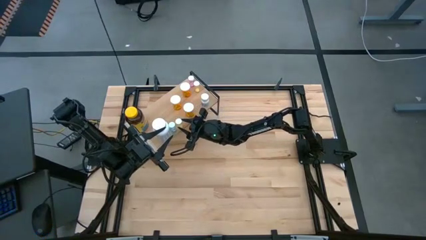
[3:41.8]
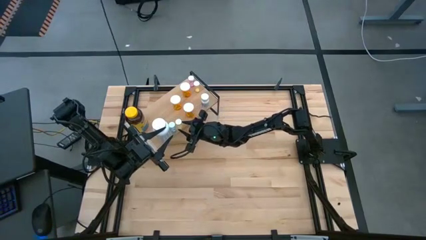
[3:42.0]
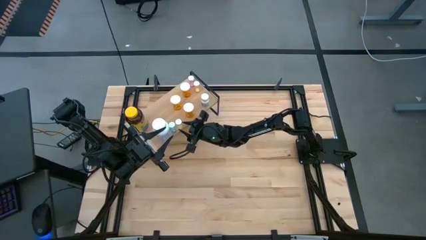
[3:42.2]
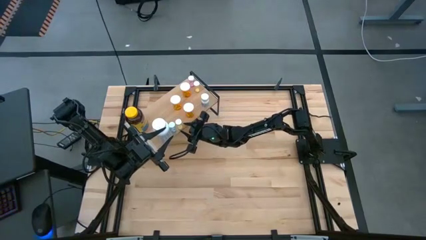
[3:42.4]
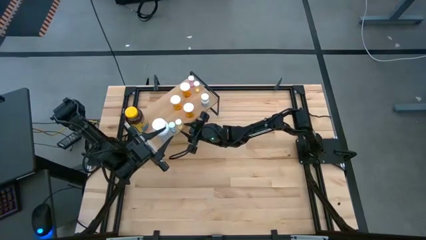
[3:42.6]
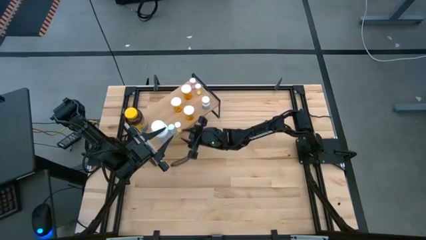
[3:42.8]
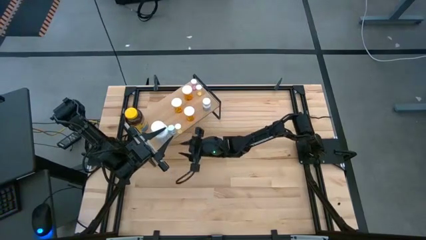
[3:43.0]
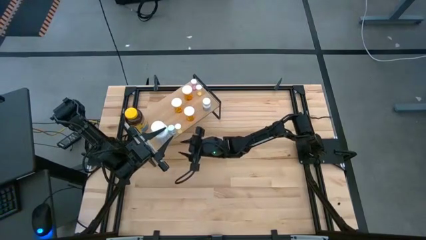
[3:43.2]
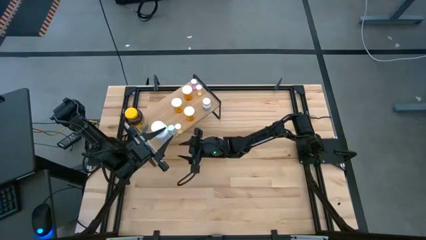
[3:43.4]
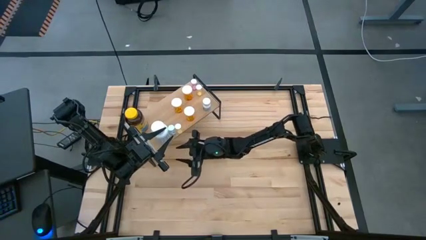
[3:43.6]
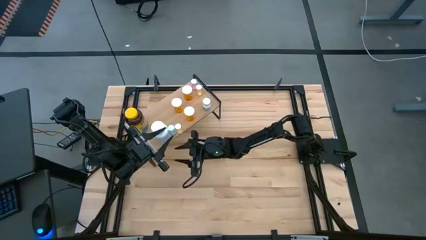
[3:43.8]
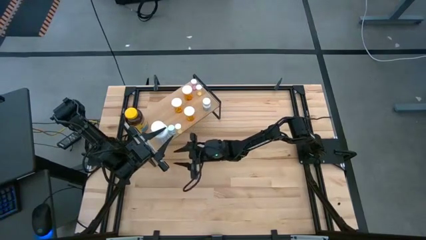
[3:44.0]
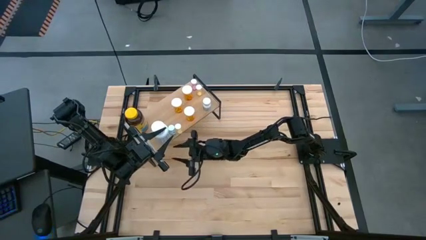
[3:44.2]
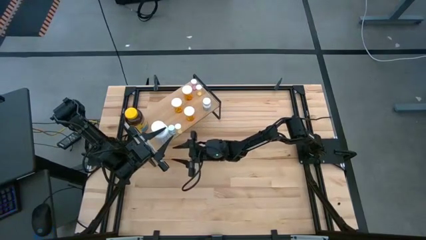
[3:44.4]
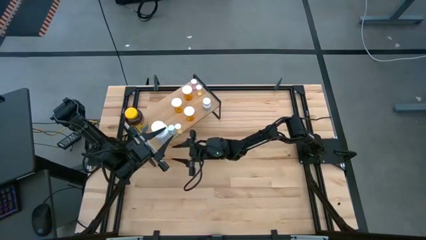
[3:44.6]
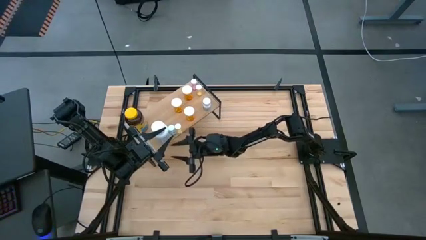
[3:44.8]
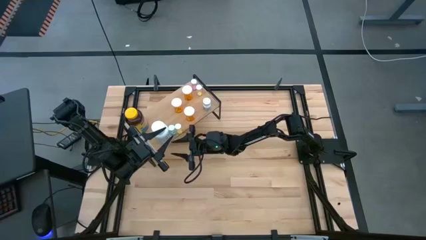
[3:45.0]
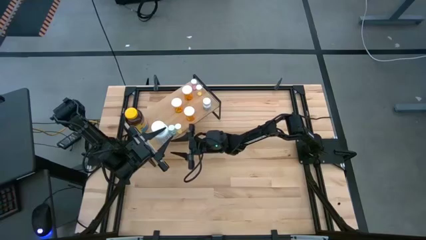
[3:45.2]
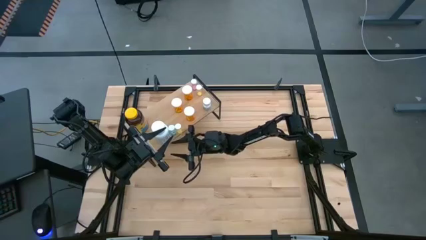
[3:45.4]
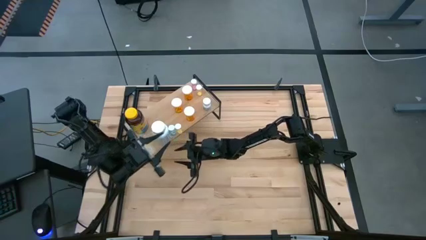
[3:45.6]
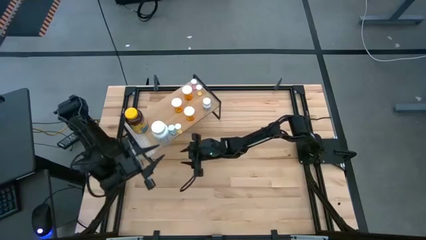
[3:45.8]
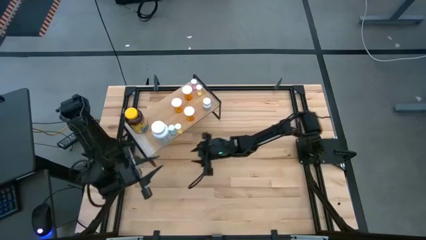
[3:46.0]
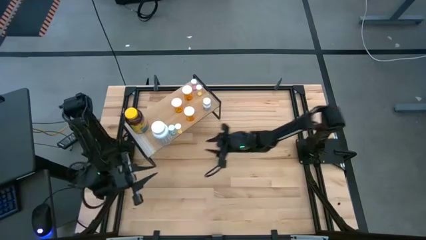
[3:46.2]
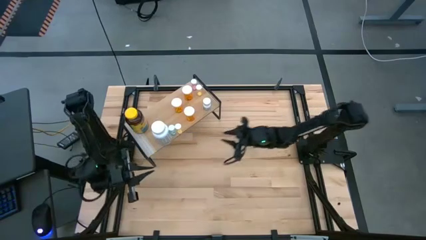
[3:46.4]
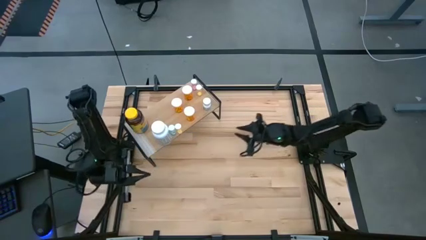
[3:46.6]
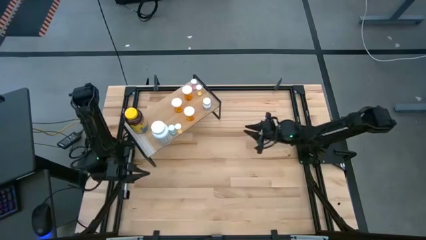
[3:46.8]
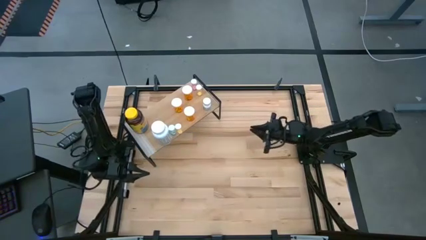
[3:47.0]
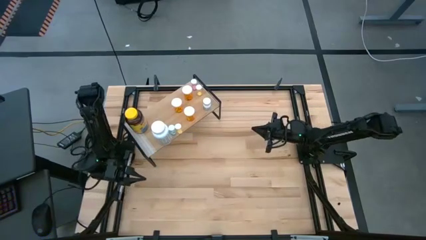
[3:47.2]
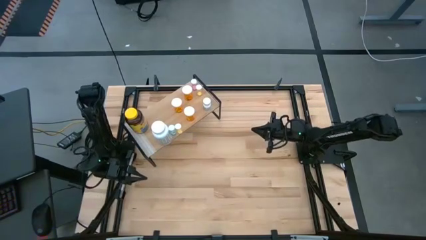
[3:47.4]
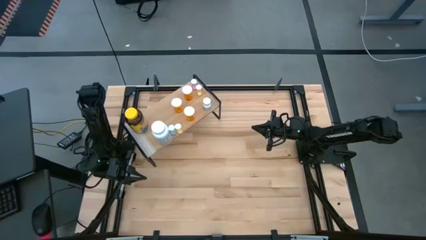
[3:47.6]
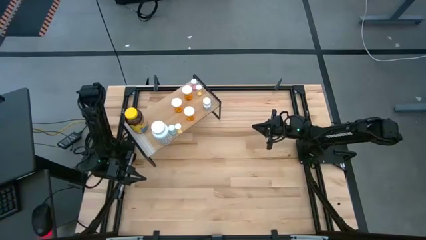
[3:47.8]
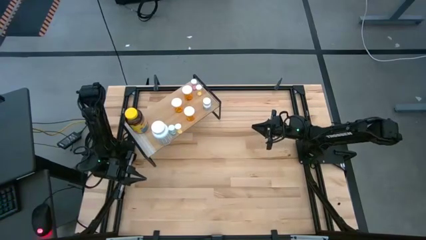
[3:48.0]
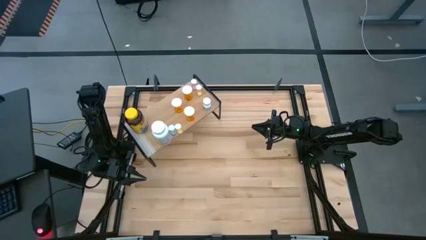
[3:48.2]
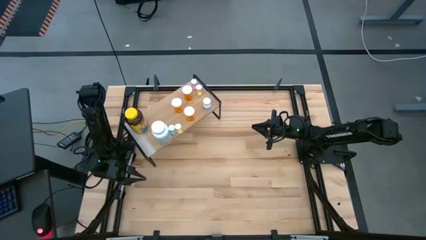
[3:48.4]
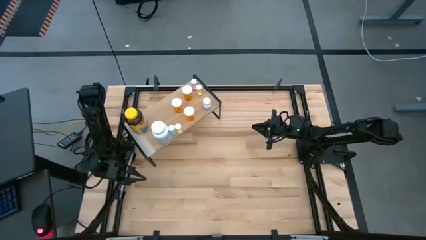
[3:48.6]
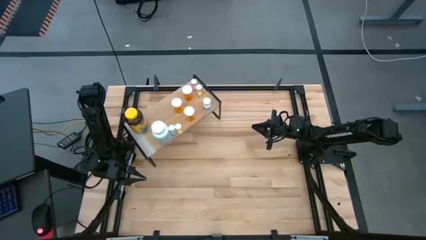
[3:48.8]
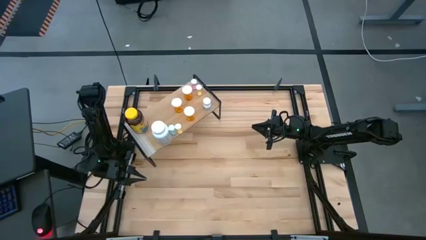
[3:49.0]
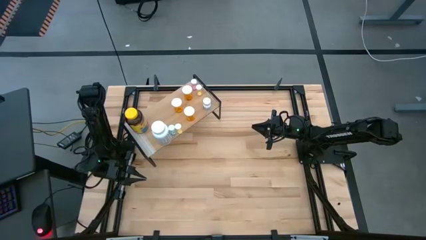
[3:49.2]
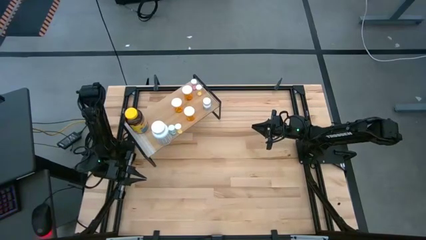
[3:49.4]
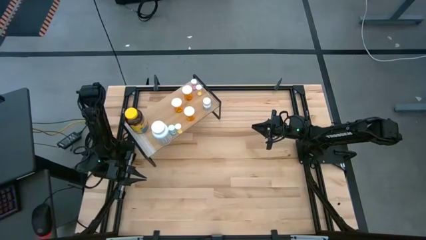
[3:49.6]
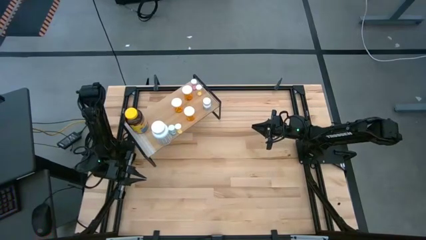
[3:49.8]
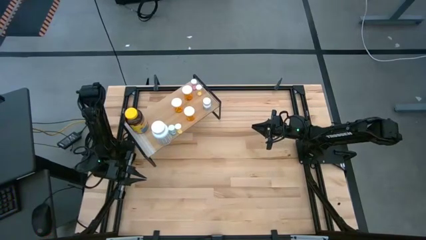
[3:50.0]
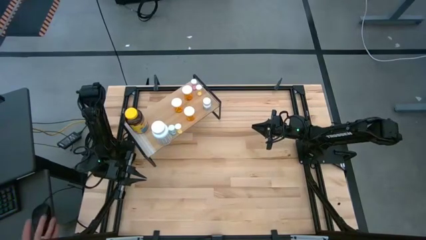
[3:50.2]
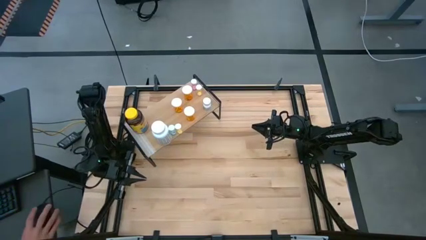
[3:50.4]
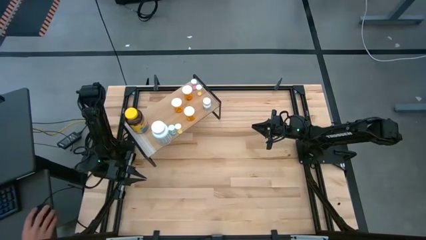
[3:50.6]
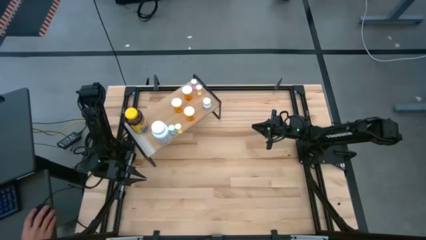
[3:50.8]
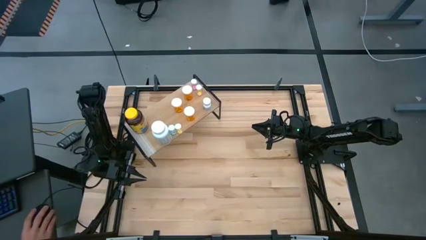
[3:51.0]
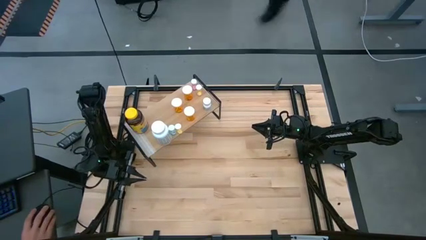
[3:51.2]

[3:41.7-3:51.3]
Task: Pick and place medicine bottles onto shelf by color
Return to Home Position
